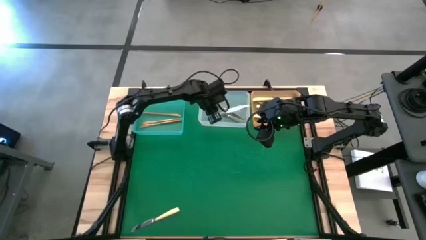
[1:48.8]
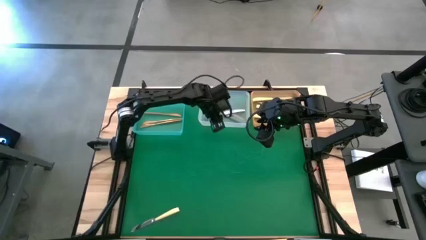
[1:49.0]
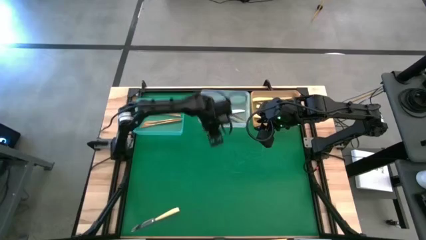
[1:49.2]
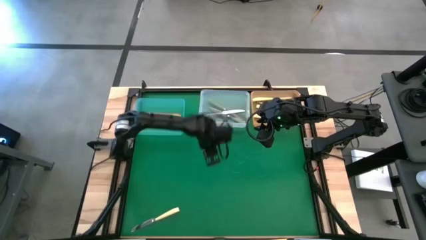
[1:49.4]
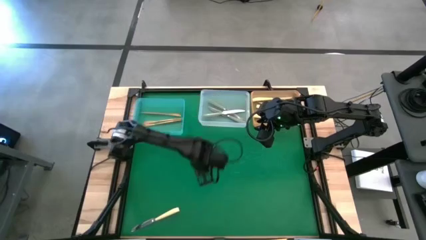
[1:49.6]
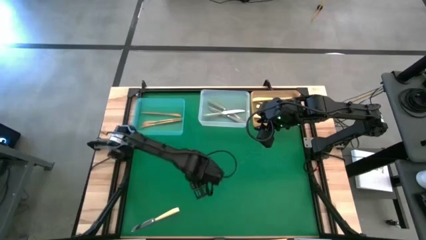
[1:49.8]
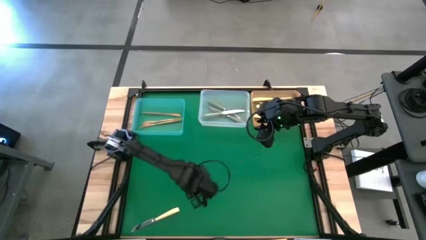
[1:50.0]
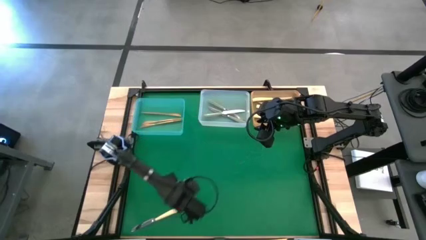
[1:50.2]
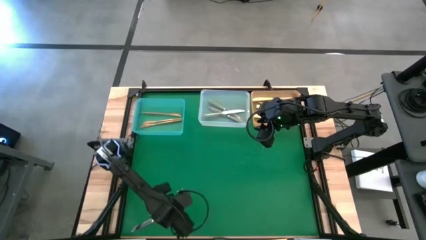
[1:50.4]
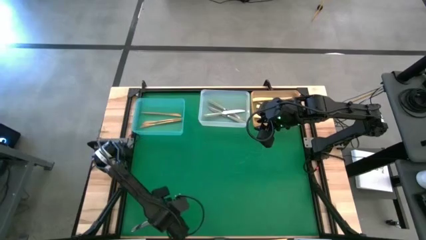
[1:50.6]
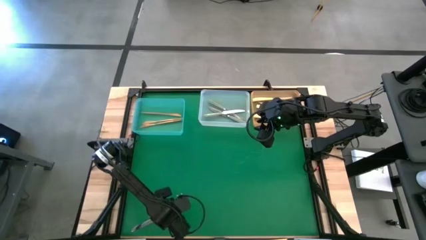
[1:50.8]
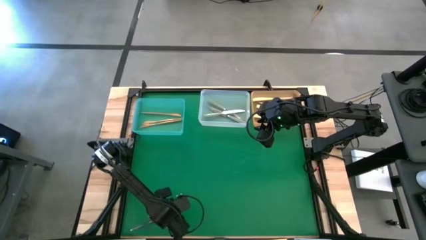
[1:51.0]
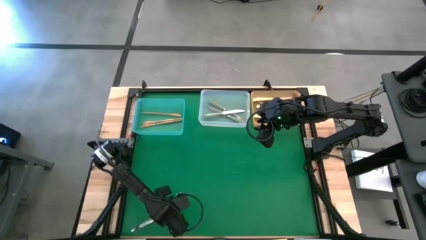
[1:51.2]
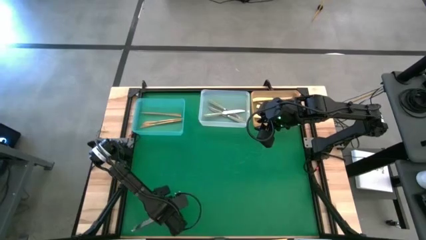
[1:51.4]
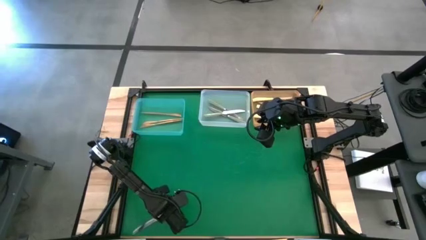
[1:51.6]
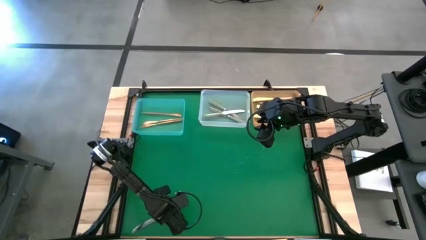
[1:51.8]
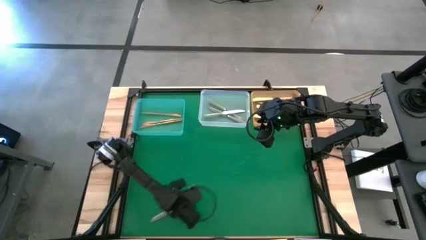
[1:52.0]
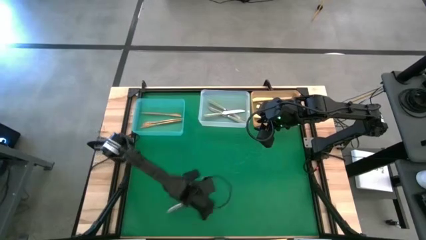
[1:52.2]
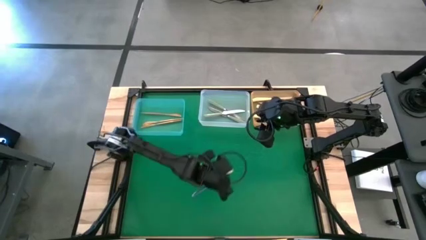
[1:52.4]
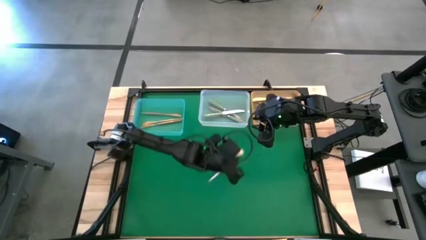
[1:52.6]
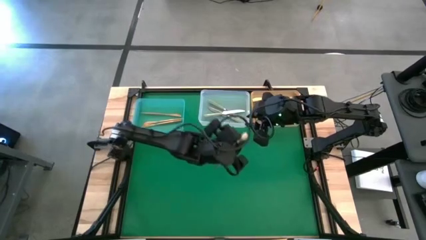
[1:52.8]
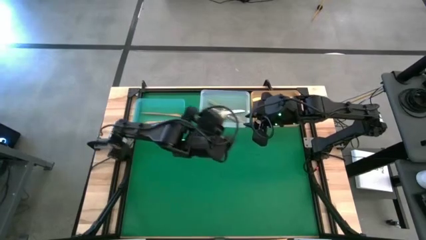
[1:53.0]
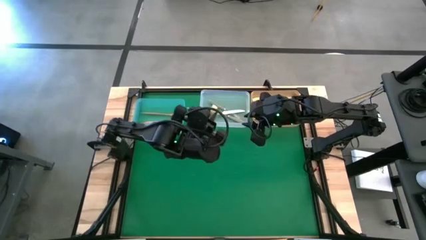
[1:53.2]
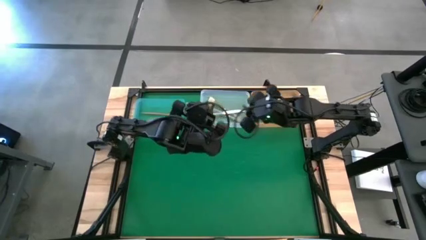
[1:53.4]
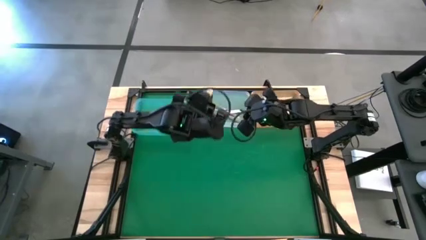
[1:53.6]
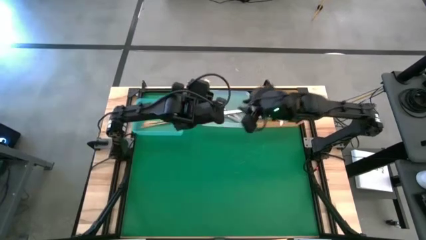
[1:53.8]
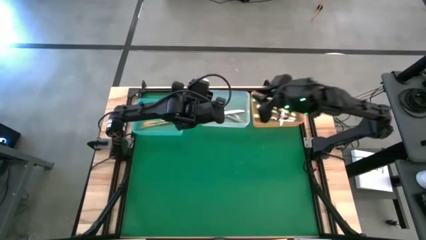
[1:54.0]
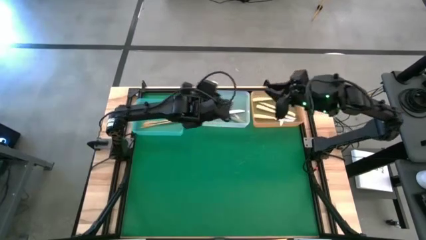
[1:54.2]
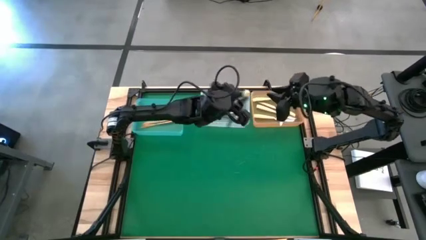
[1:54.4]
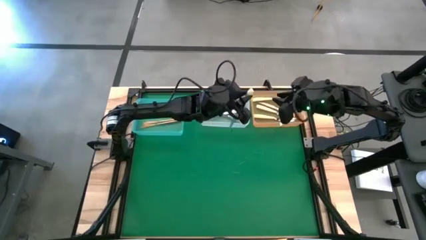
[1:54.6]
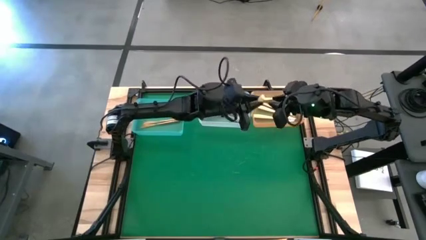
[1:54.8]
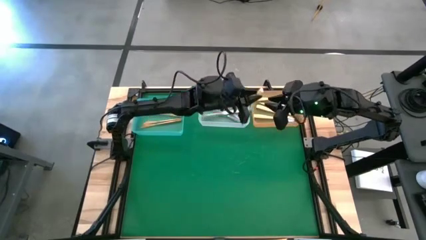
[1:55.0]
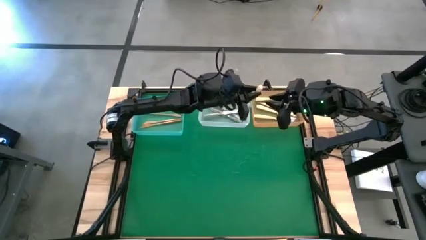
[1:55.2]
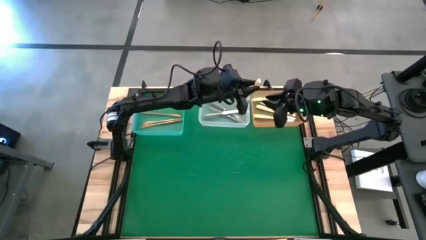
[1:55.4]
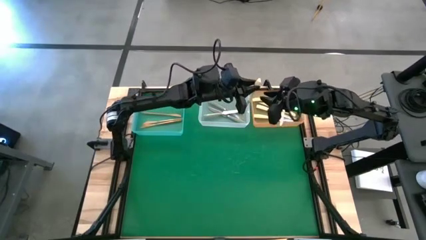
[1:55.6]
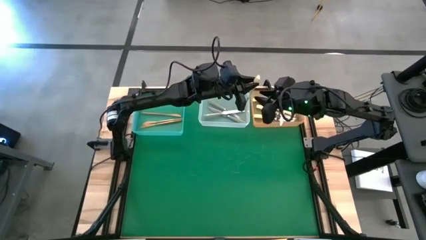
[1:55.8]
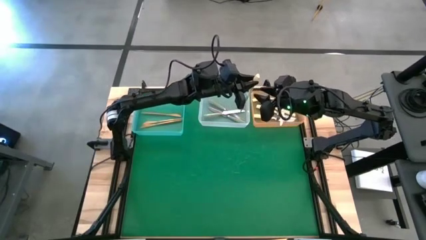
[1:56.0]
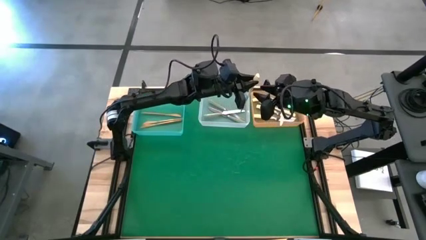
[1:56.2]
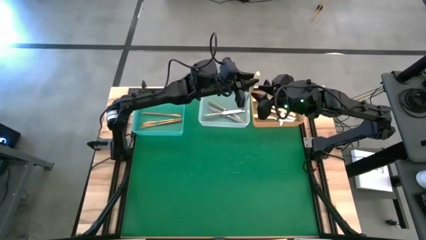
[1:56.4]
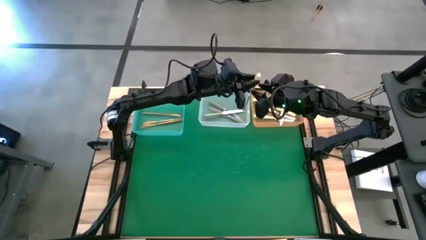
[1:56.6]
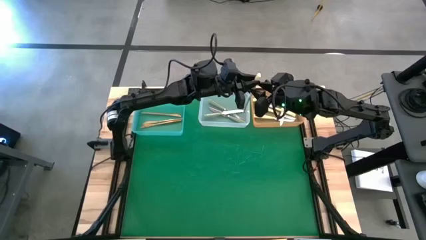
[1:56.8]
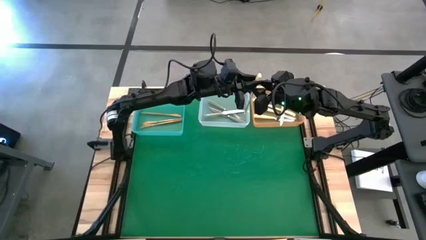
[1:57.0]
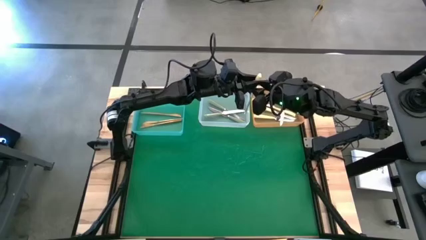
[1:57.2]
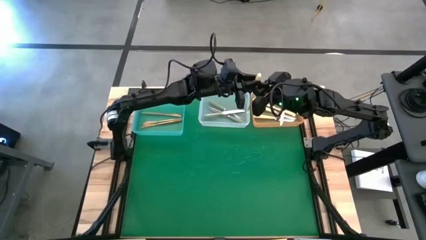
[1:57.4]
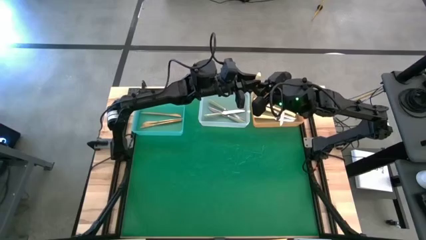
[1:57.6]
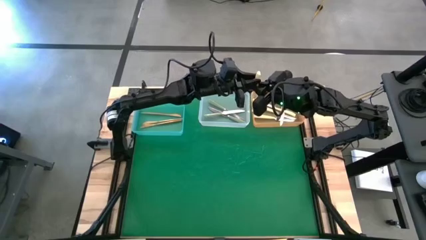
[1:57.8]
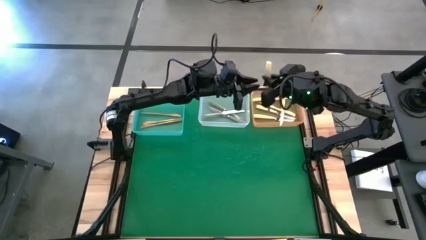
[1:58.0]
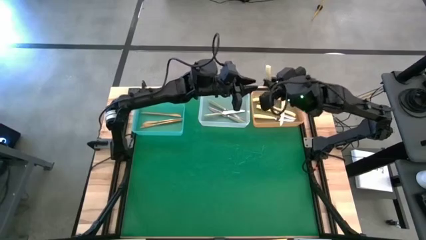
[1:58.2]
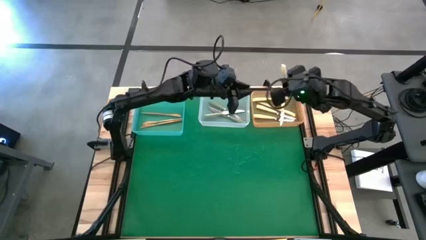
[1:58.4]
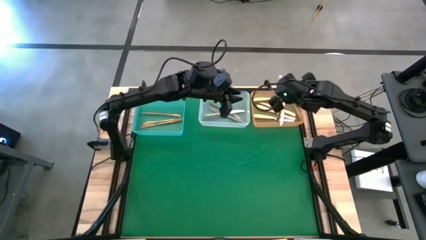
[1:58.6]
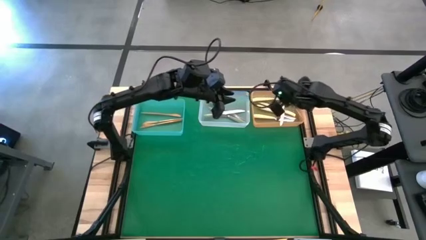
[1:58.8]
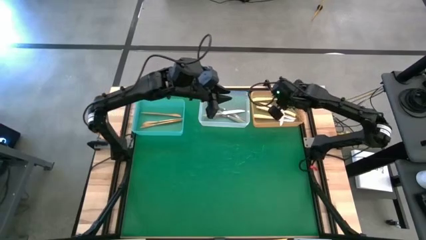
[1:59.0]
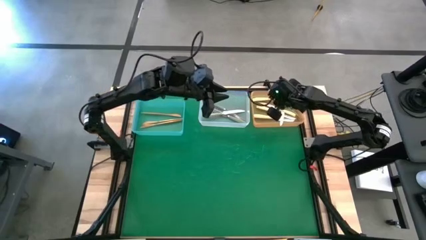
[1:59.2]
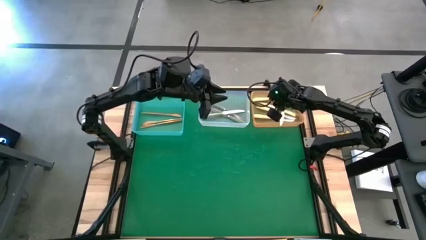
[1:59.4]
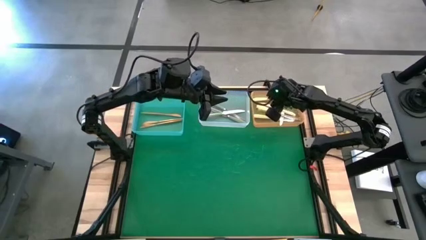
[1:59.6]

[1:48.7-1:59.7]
Task: Sort silverware by color (type)
Put the yellow knife into the orange bin

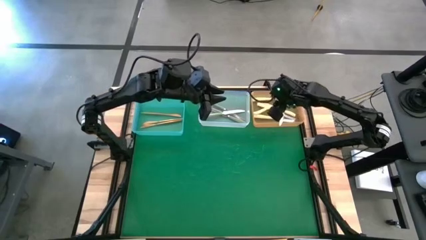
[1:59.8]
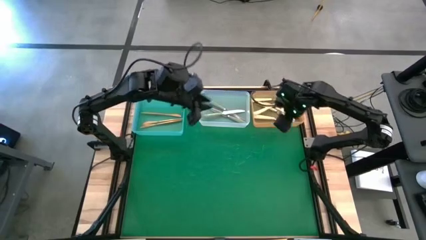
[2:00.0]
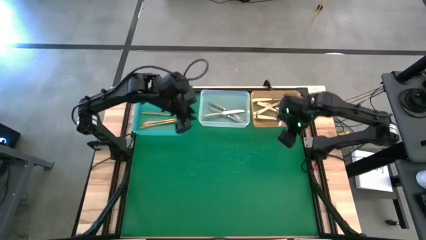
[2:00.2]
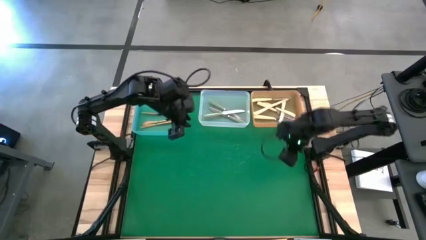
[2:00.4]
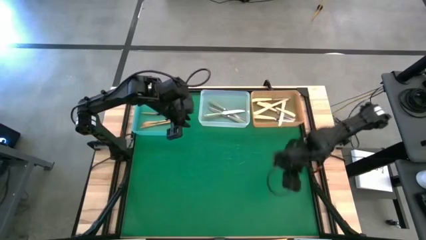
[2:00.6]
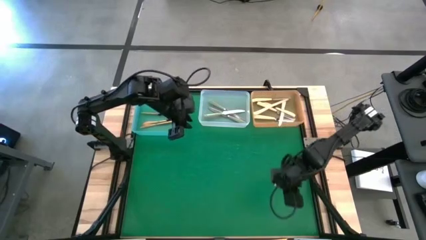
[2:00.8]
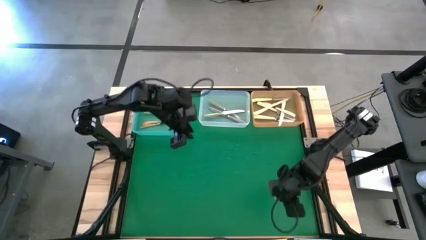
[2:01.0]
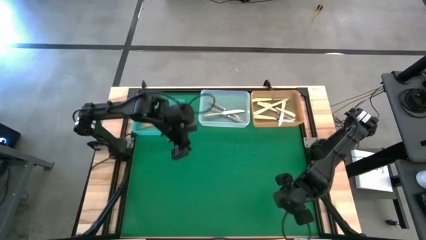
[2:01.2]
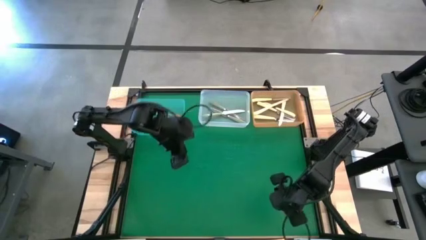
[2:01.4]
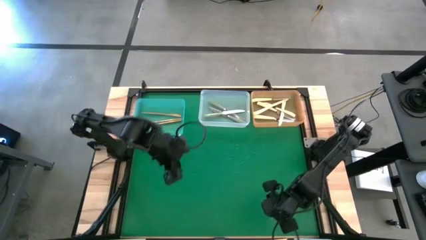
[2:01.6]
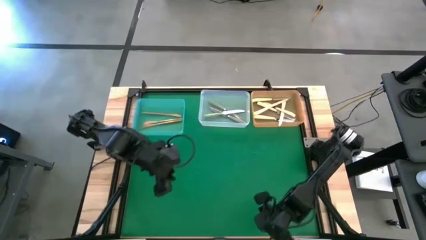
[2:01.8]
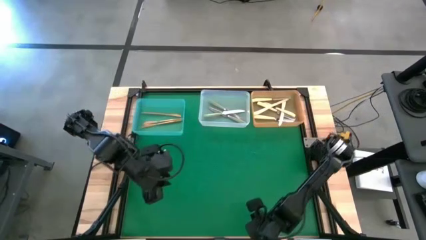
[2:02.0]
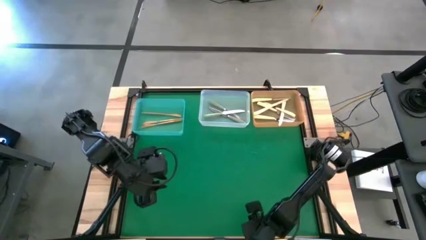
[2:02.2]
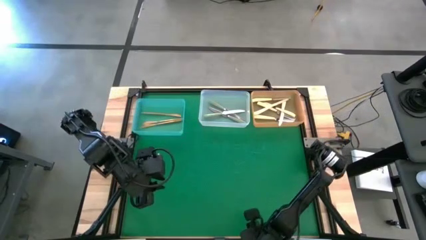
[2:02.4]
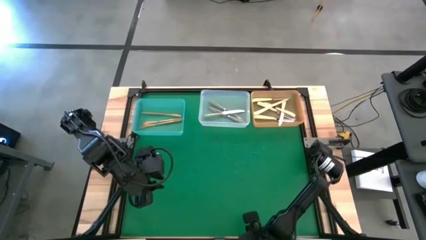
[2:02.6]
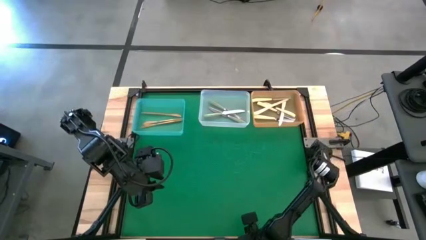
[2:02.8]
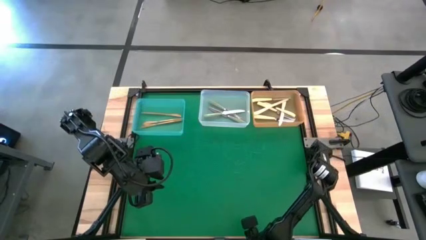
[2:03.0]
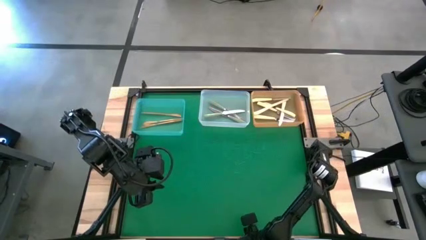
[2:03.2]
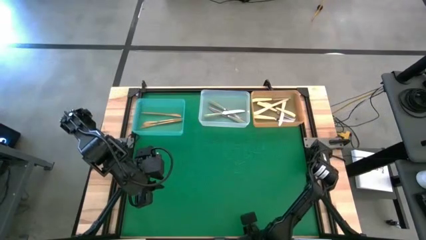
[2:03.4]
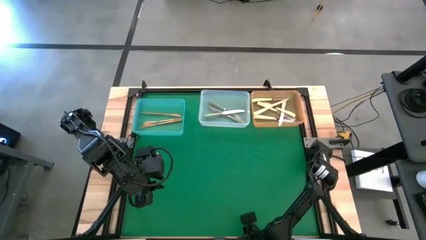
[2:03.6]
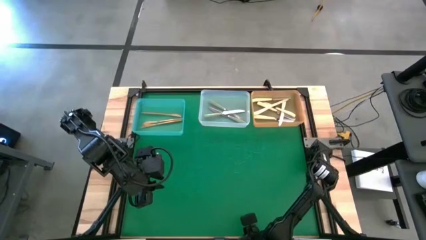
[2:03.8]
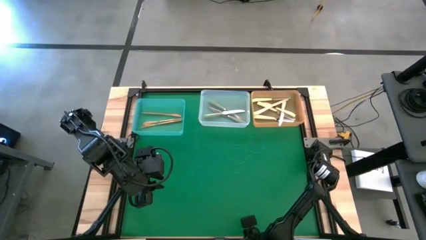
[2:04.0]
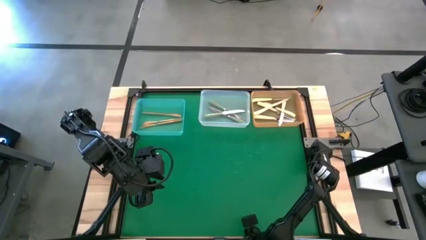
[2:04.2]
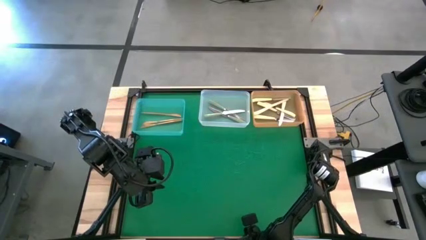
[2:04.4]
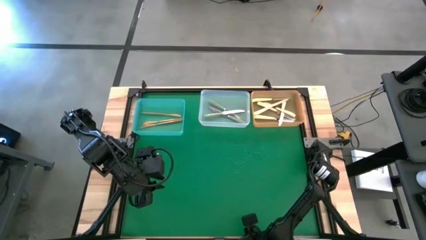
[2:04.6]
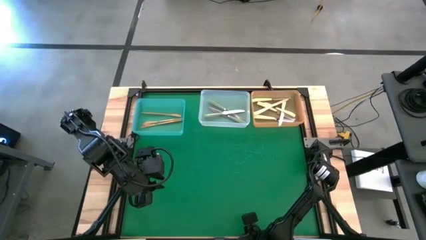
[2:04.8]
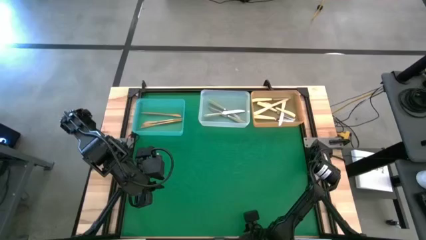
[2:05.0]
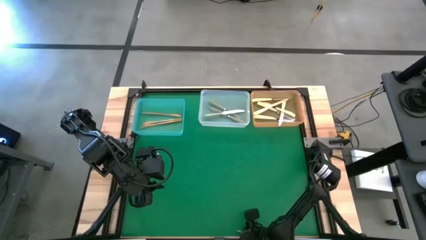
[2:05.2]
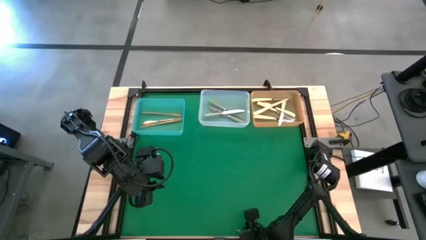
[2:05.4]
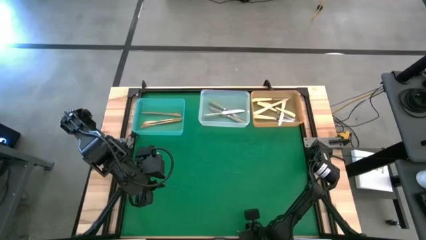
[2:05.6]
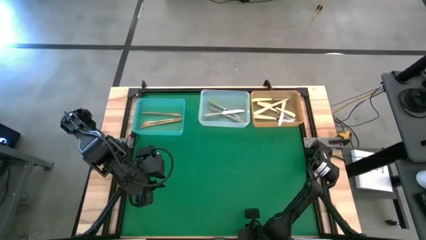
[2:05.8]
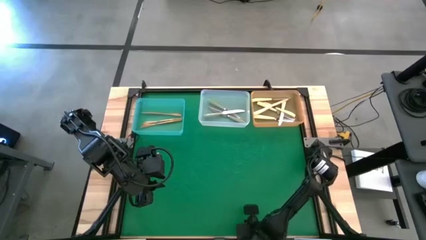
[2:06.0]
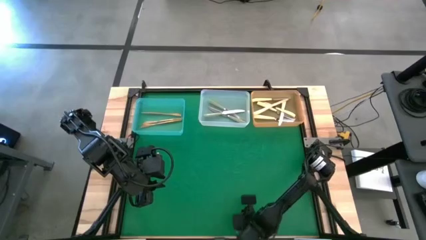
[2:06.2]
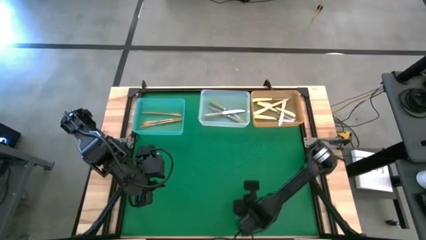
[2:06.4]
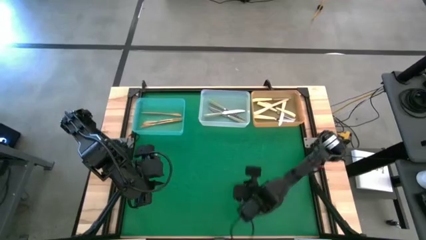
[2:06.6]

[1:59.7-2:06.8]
Put the gold knife into the blue bin
